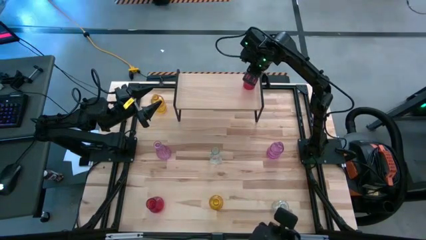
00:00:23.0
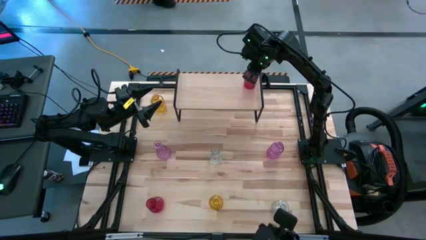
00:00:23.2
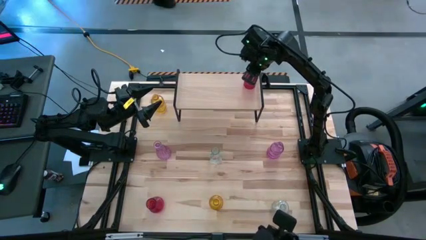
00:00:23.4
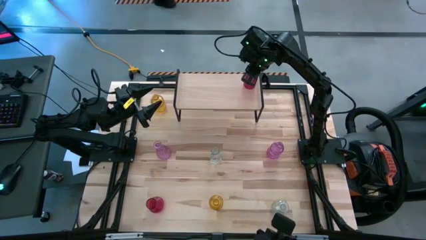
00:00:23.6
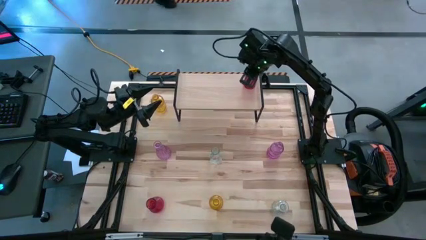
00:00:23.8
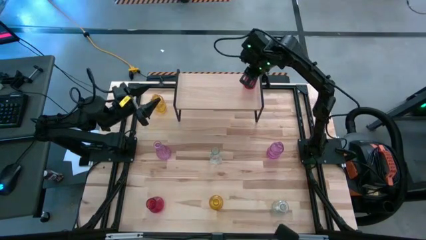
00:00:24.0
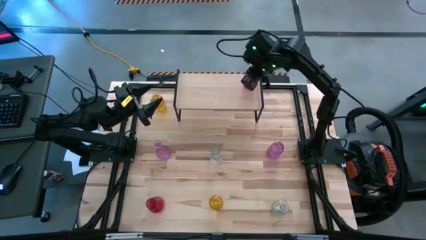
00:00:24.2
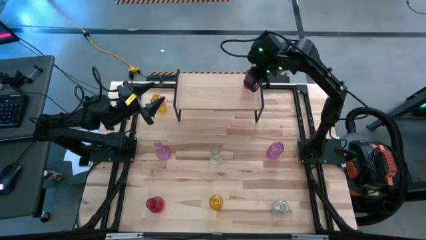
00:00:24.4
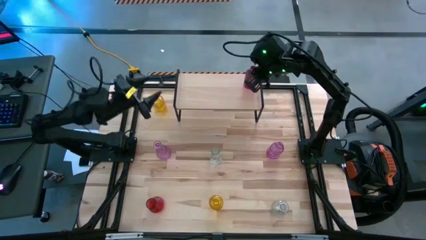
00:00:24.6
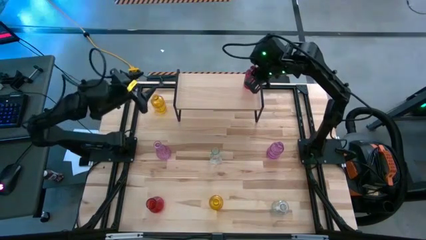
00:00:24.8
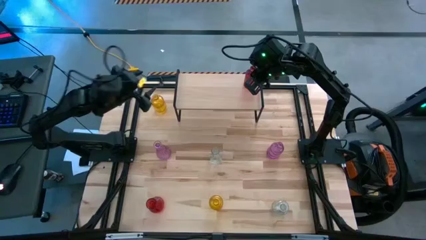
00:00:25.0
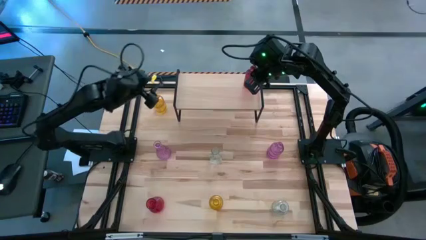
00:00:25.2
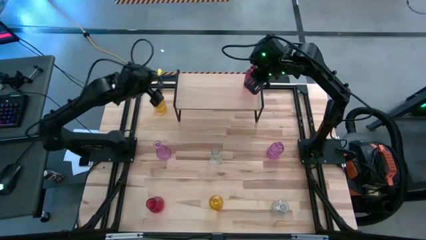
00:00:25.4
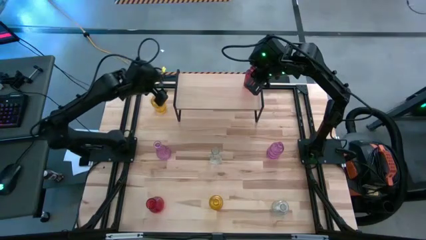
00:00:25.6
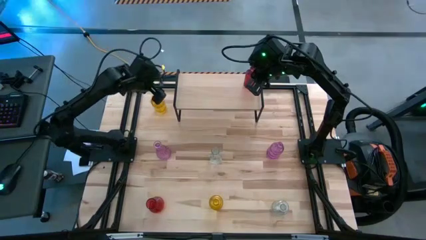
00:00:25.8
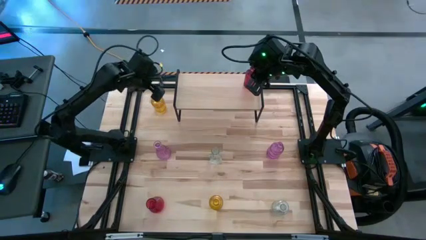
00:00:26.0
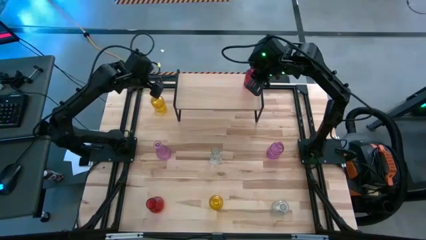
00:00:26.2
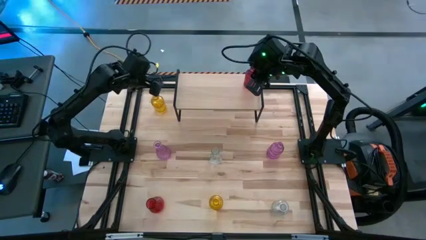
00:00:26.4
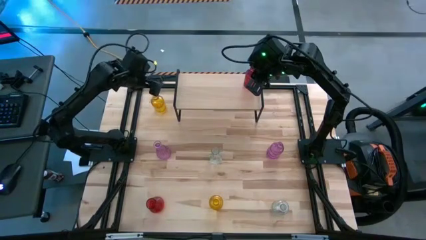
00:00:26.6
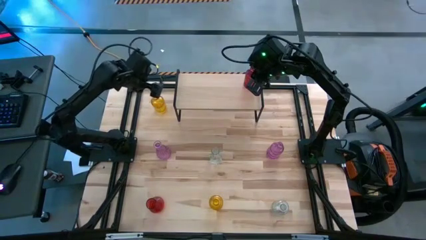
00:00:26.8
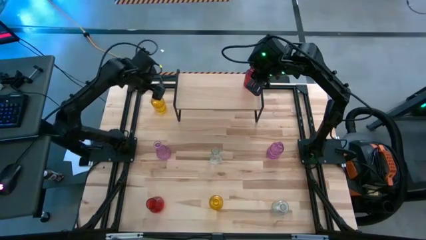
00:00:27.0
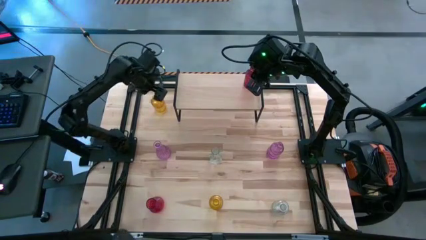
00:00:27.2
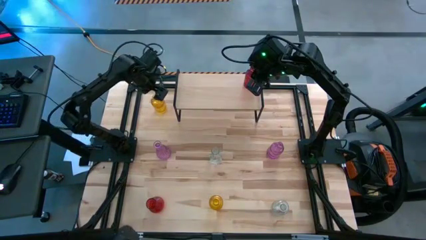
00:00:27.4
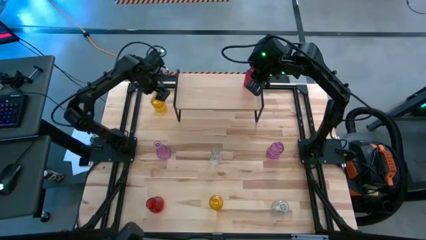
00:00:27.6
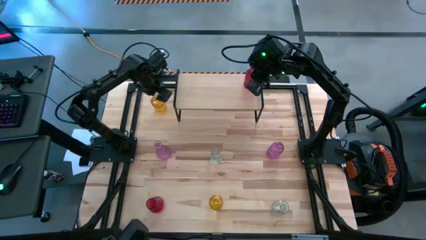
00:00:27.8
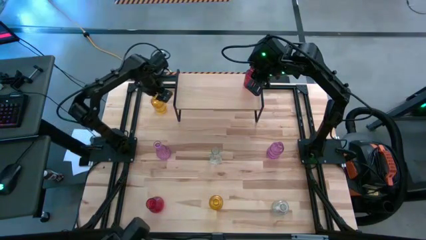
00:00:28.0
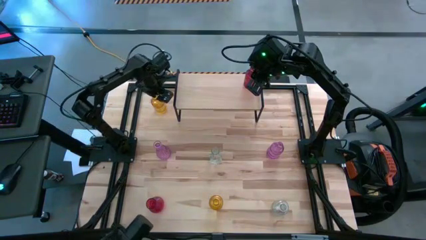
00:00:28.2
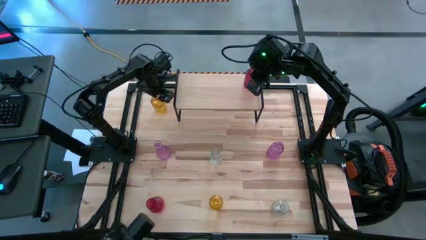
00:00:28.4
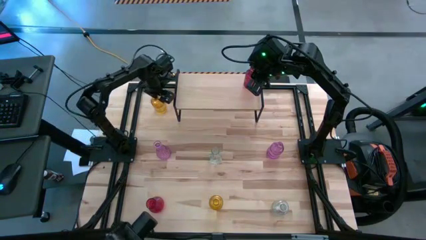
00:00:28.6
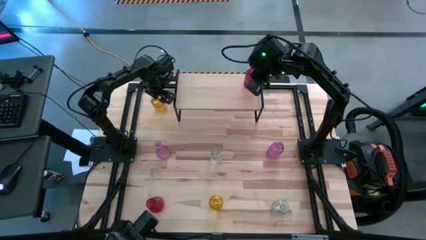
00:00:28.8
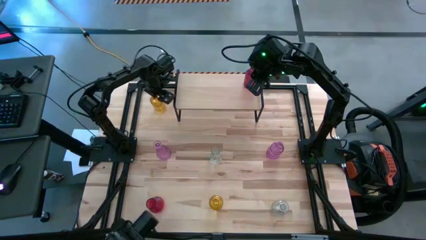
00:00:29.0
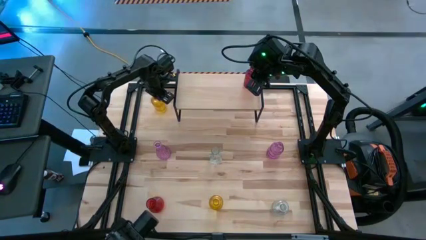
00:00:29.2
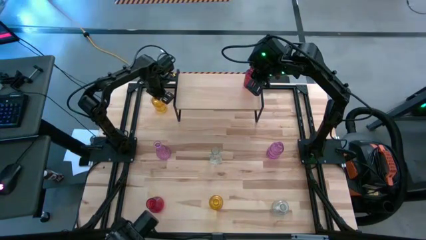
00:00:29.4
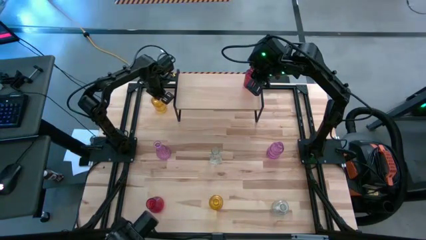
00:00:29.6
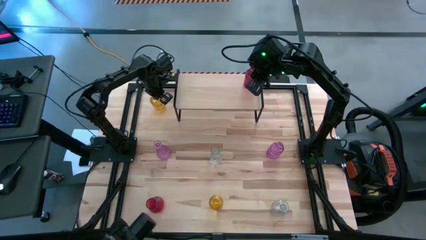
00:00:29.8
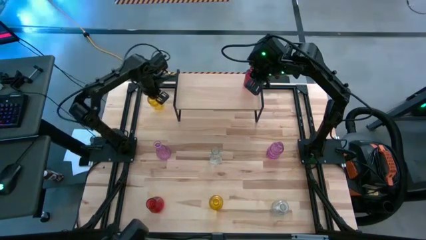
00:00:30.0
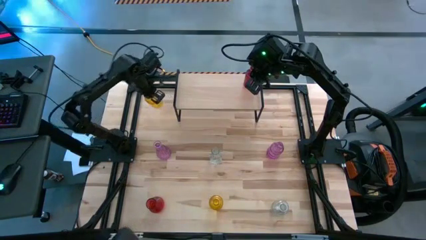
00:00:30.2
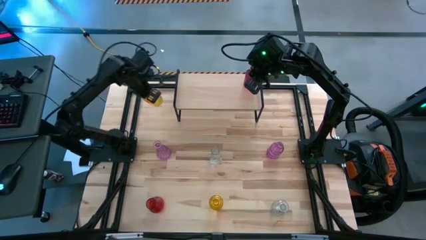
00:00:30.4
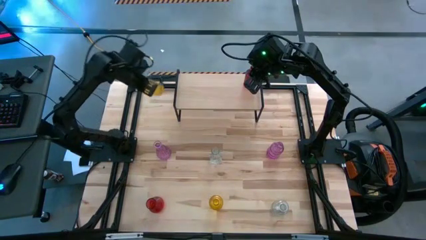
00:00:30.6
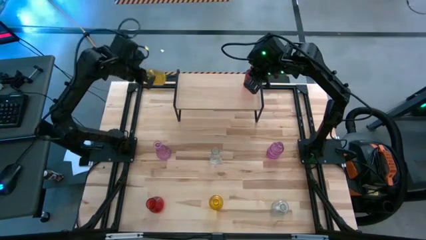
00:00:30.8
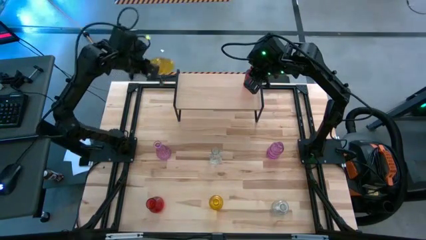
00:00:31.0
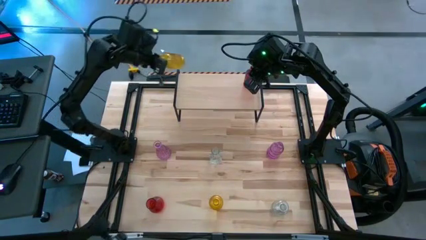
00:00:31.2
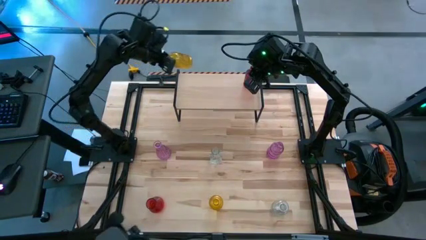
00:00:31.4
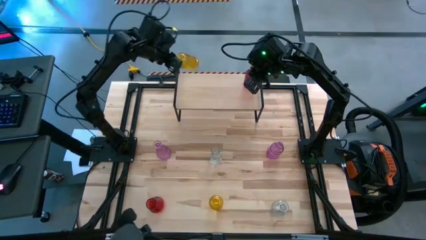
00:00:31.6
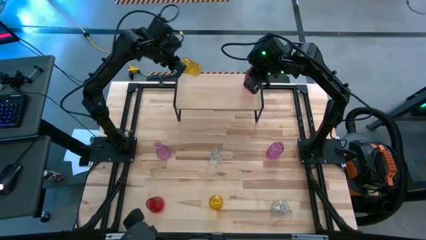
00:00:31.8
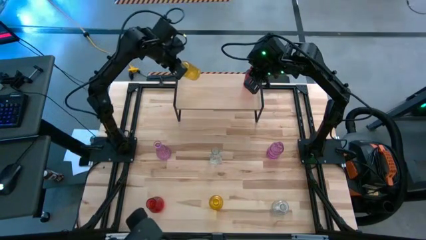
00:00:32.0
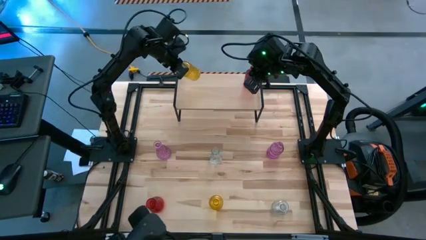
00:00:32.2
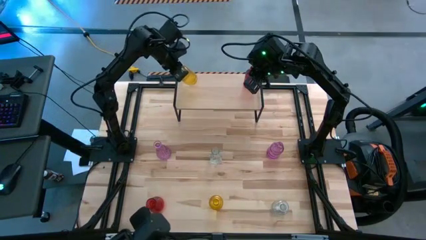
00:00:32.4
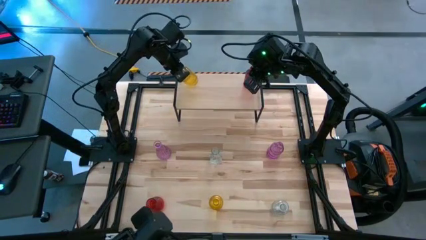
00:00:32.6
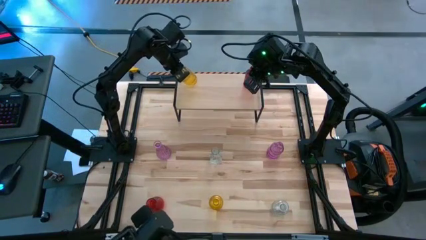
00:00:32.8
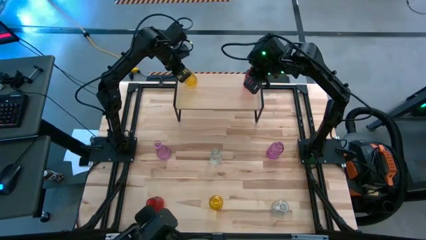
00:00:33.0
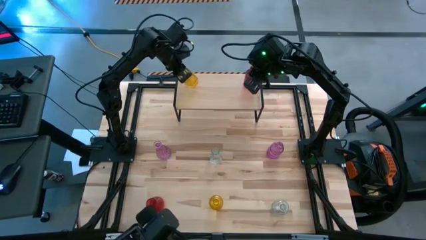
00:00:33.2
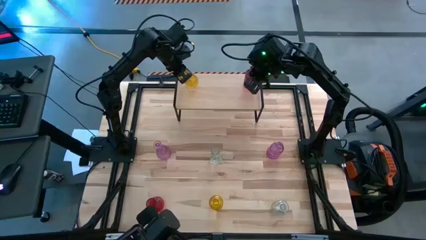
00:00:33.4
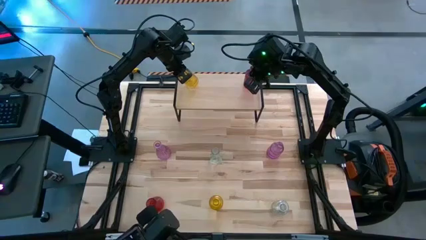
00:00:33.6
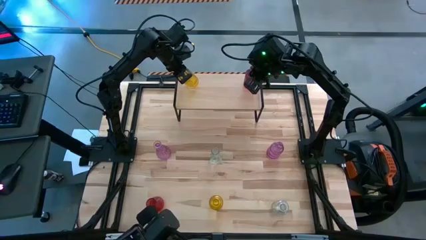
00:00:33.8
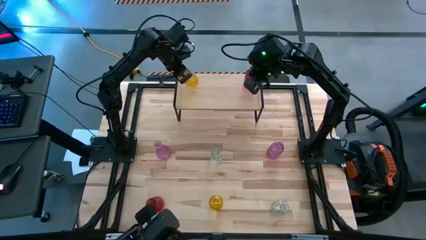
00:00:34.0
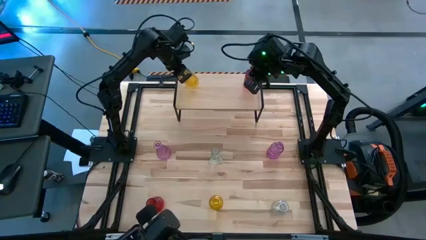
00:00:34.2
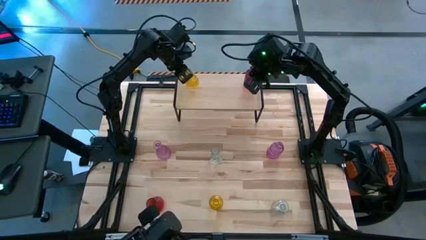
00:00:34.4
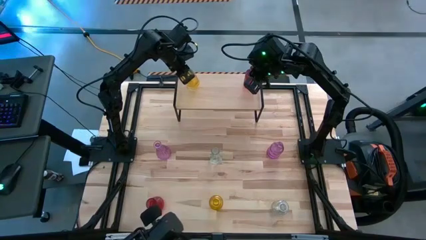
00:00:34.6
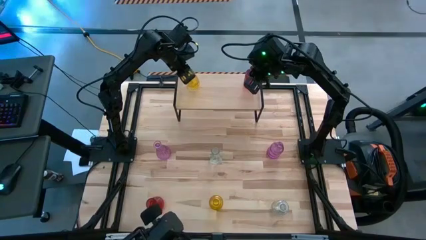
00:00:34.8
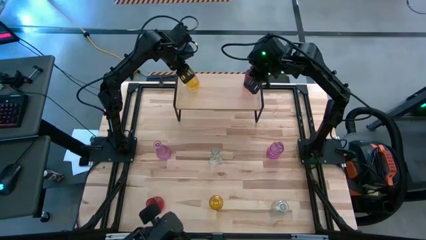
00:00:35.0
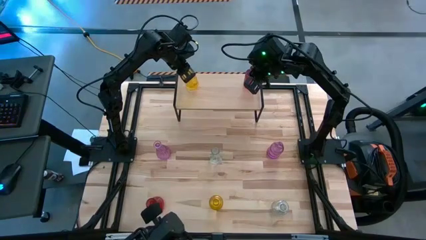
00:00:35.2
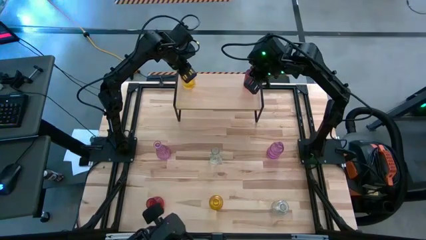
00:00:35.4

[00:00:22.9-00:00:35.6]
Task: sort vases onto shelf
Put the top yellow vase on the shelf

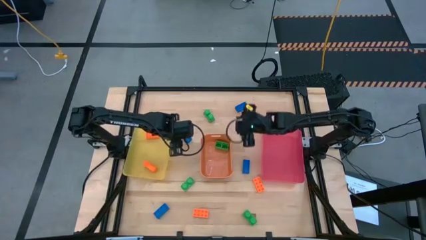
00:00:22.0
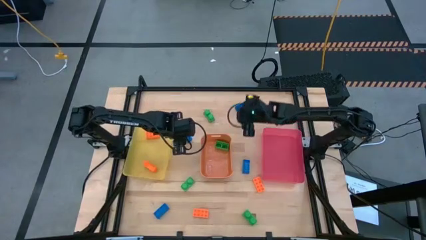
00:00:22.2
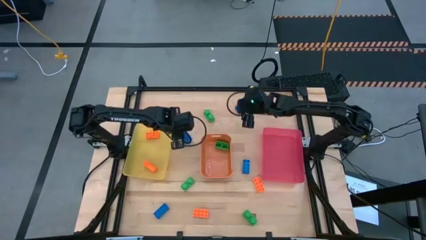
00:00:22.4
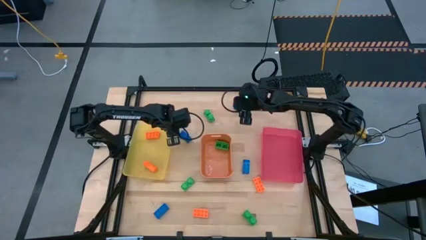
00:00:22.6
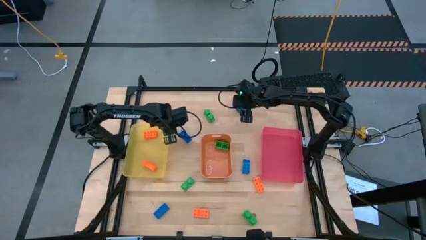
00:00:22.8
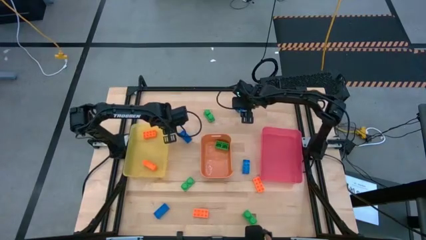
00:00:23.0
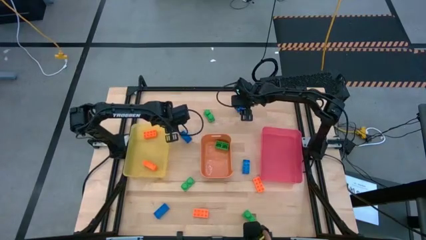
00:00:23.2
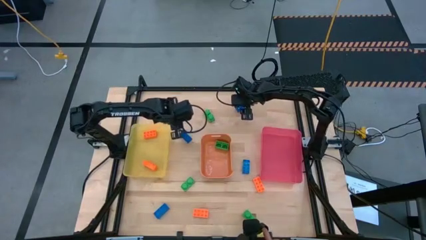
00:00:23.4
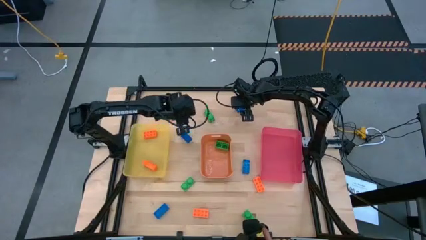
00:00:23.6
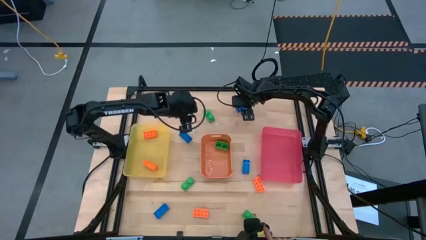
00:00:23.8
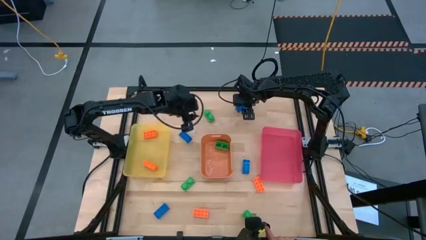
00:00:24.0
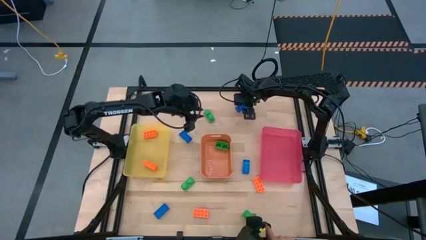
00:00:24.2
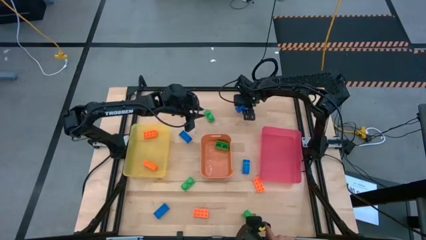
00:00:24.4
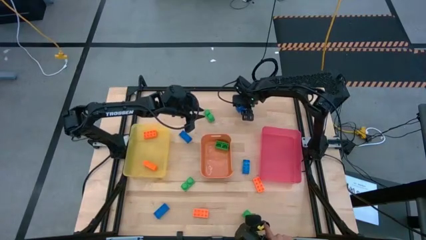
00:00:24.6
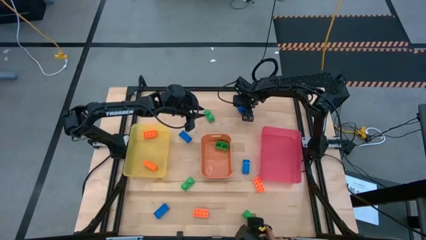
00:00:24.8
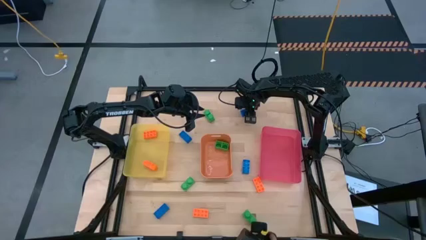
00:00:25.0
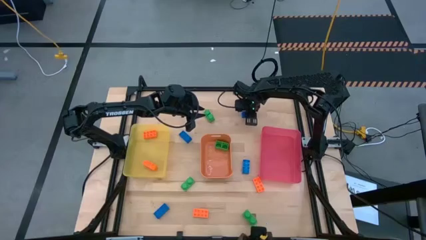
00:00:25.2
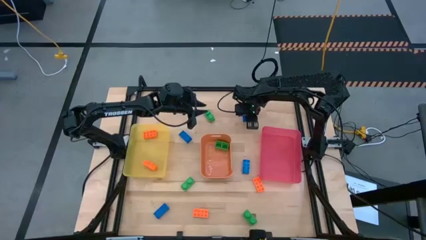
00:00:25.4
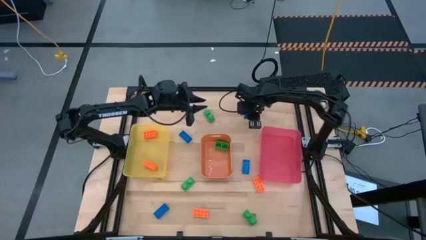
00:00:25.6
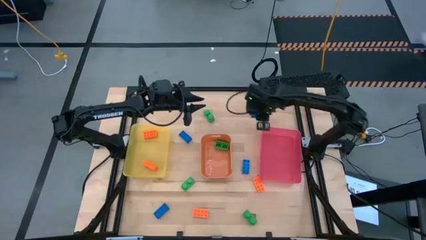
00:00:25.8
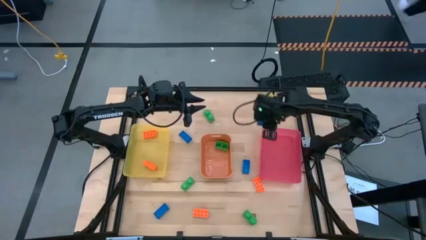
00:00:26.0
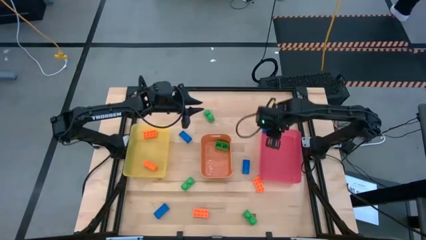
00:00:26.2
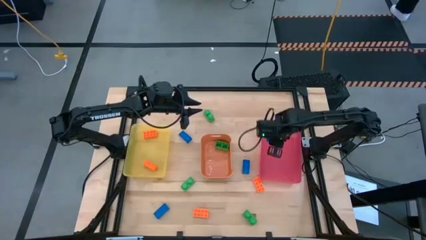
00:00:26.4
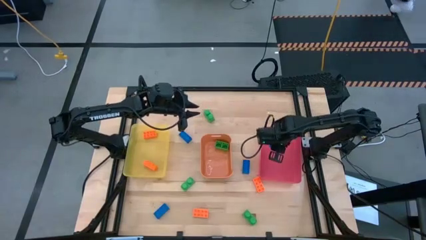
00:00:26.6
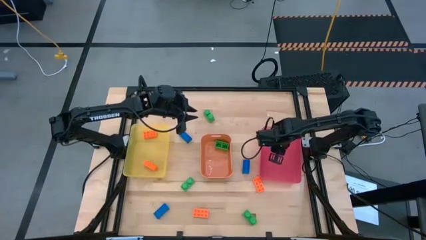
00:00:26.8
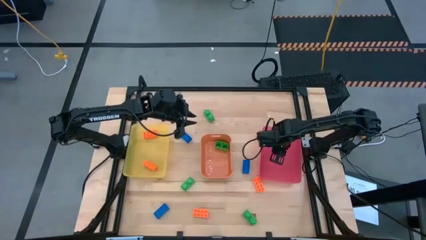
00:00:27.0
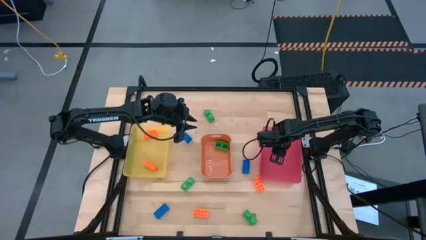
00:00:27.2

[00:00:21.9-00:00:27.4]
Task: Sort & place blocks by color
Put the blue game piece into the pink bin
